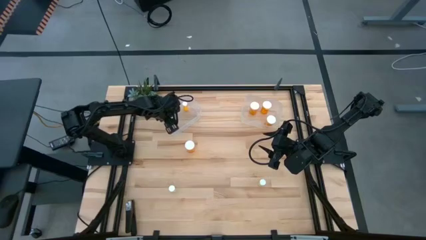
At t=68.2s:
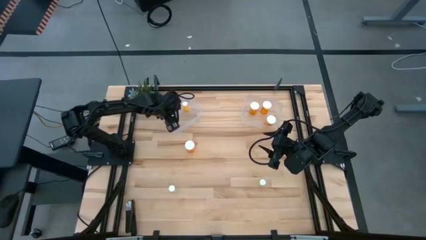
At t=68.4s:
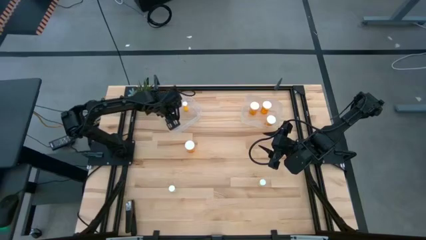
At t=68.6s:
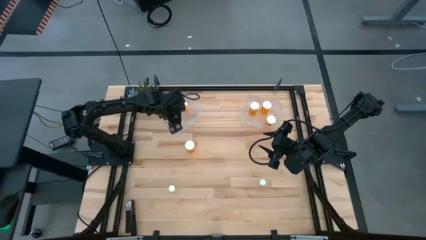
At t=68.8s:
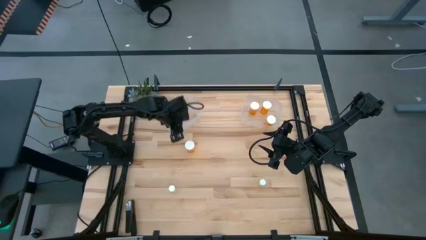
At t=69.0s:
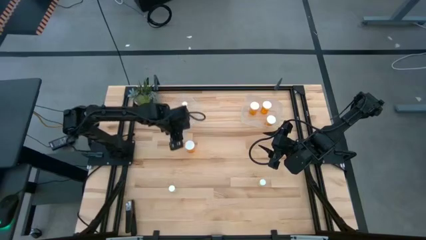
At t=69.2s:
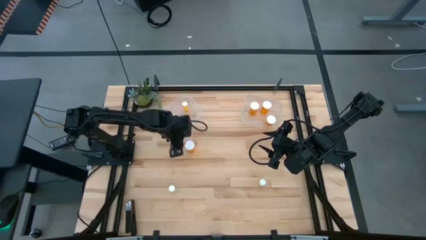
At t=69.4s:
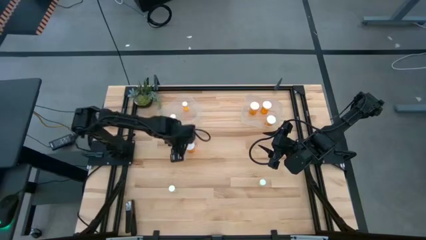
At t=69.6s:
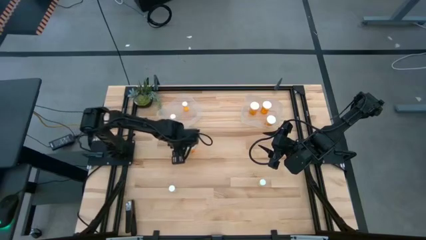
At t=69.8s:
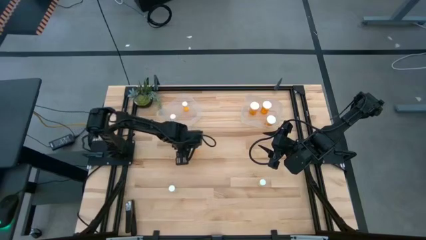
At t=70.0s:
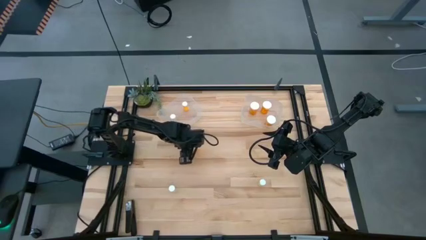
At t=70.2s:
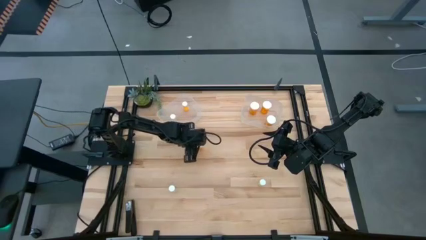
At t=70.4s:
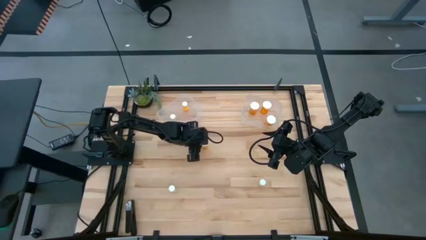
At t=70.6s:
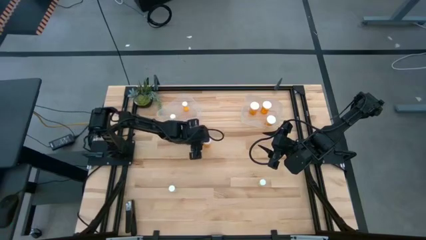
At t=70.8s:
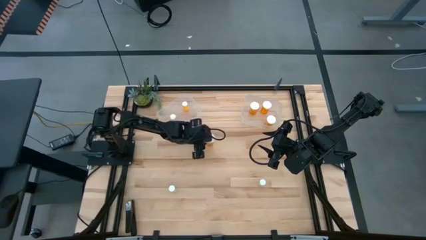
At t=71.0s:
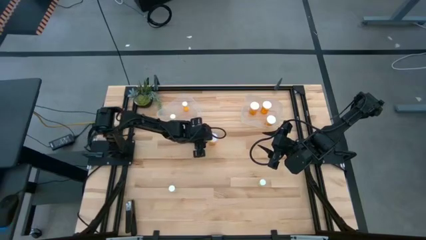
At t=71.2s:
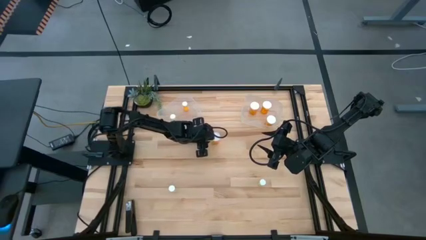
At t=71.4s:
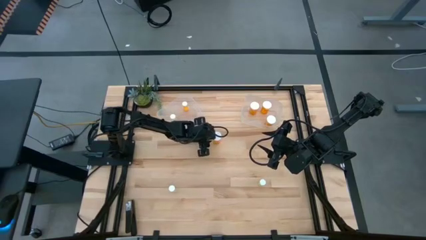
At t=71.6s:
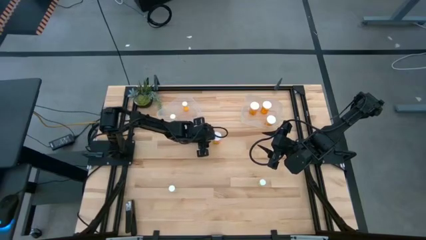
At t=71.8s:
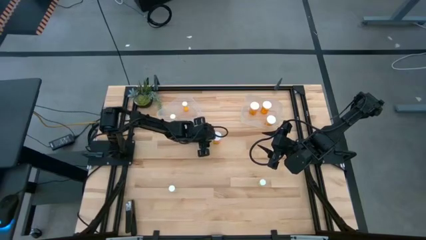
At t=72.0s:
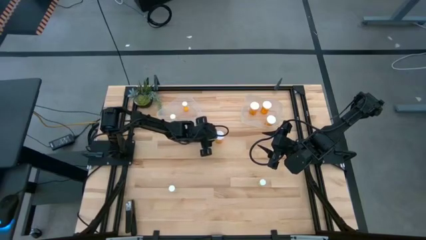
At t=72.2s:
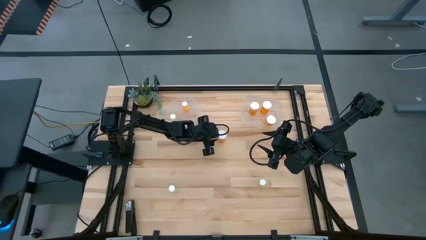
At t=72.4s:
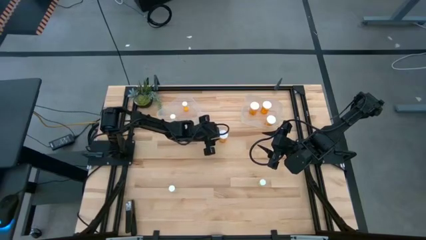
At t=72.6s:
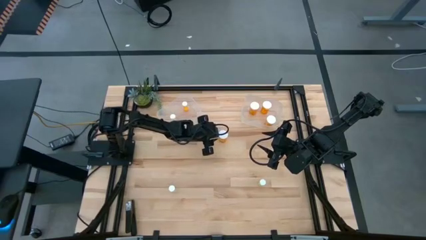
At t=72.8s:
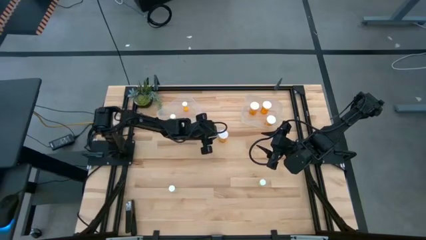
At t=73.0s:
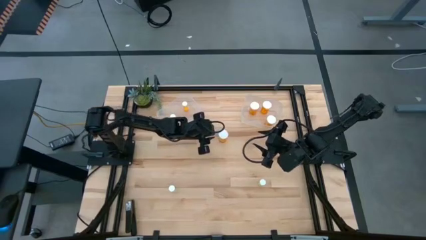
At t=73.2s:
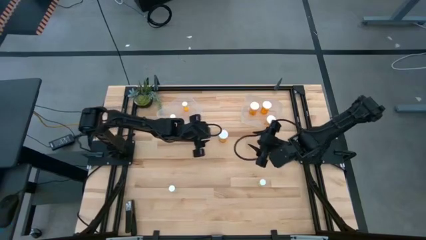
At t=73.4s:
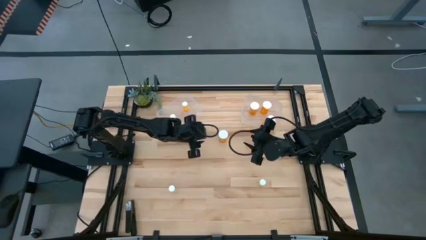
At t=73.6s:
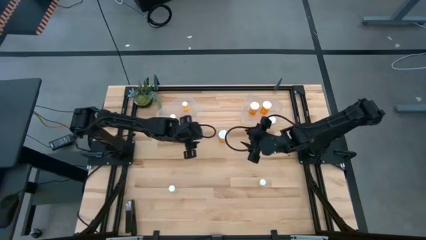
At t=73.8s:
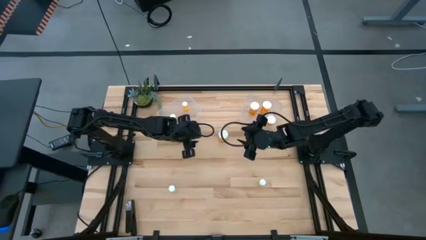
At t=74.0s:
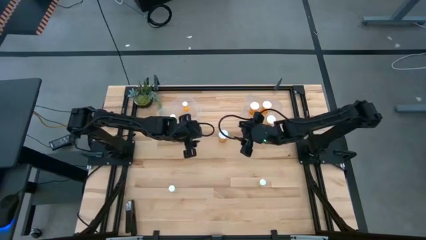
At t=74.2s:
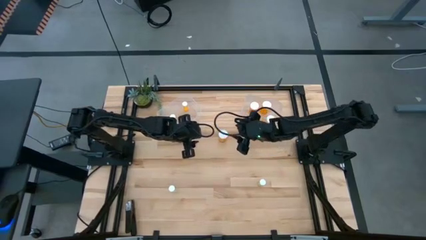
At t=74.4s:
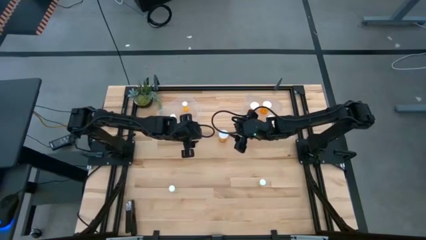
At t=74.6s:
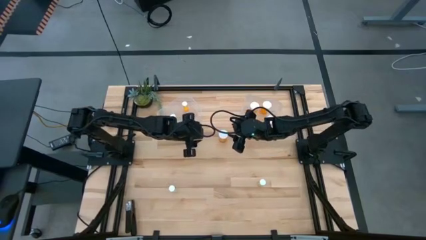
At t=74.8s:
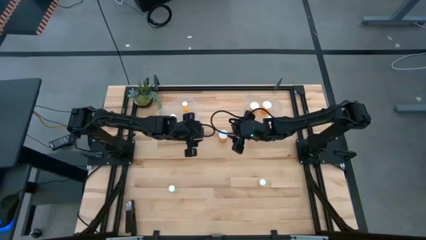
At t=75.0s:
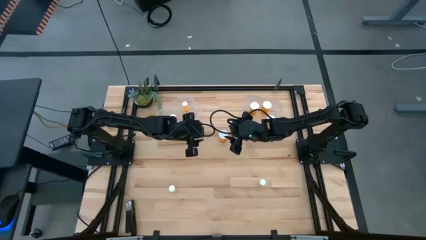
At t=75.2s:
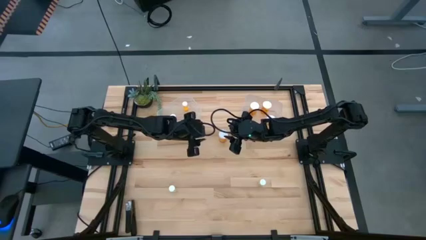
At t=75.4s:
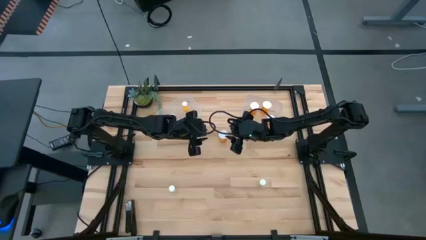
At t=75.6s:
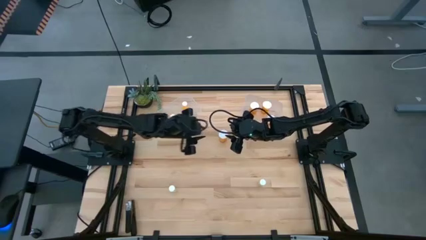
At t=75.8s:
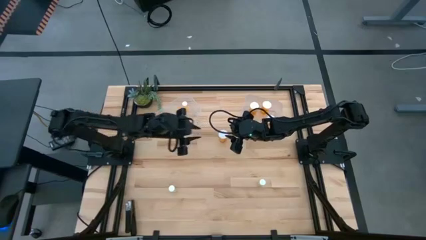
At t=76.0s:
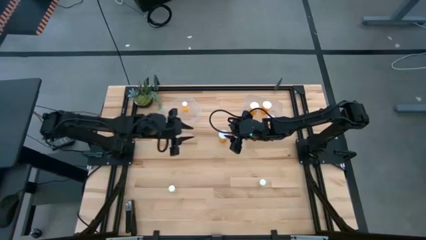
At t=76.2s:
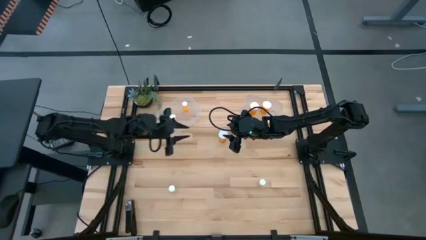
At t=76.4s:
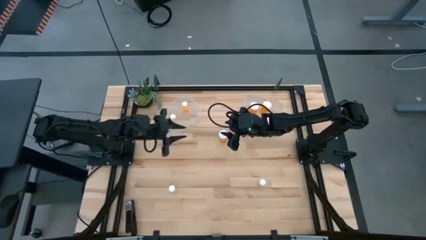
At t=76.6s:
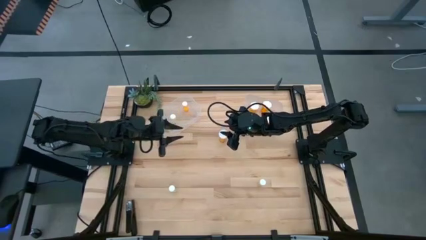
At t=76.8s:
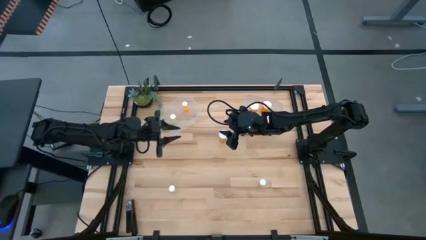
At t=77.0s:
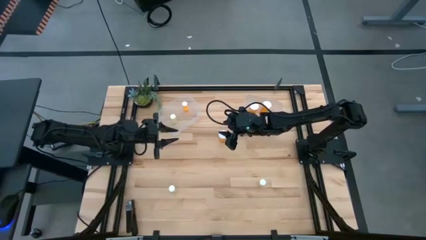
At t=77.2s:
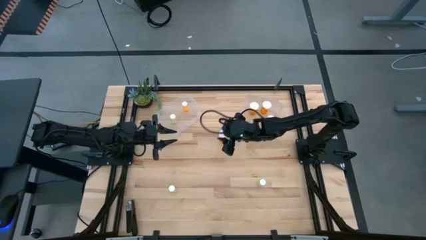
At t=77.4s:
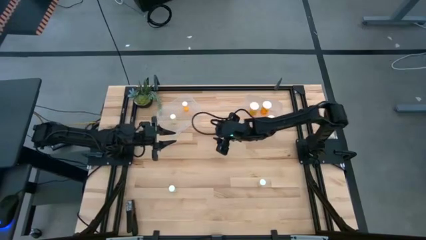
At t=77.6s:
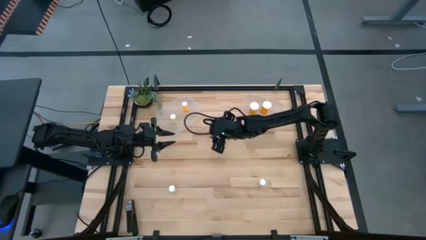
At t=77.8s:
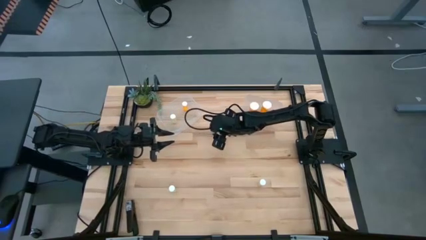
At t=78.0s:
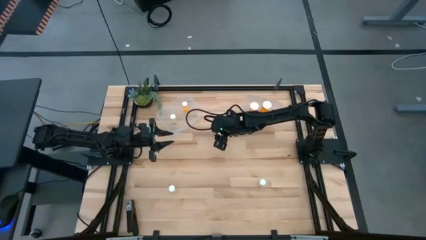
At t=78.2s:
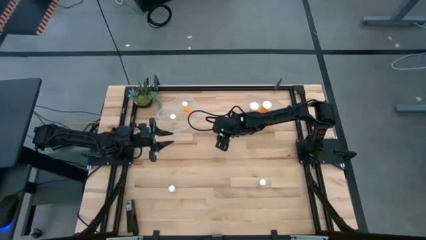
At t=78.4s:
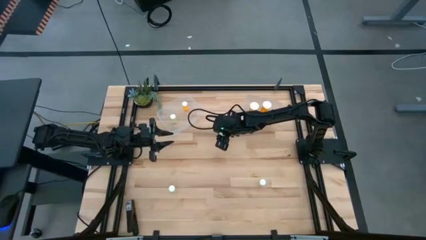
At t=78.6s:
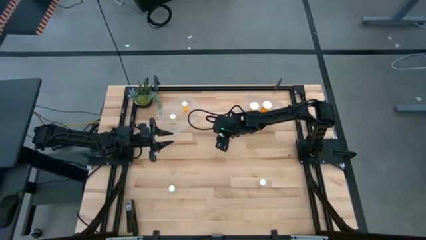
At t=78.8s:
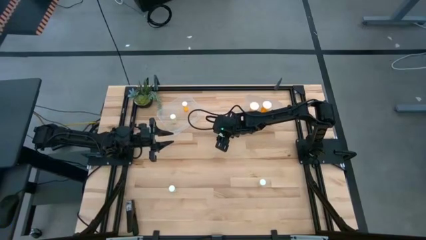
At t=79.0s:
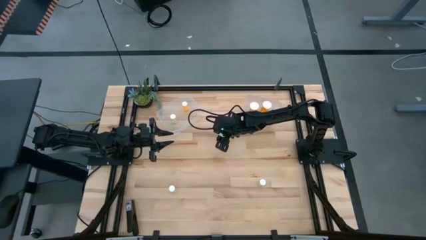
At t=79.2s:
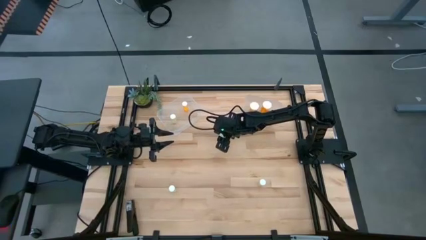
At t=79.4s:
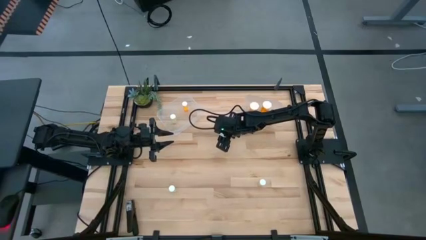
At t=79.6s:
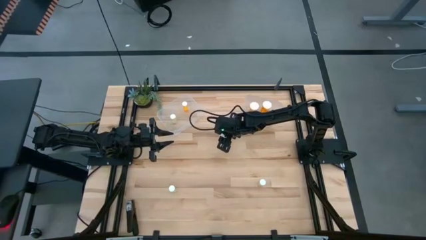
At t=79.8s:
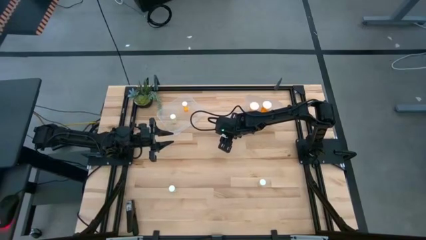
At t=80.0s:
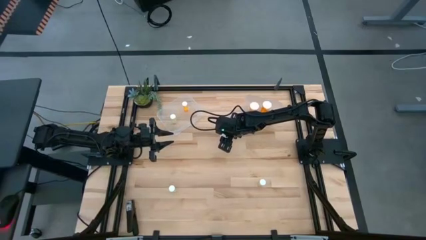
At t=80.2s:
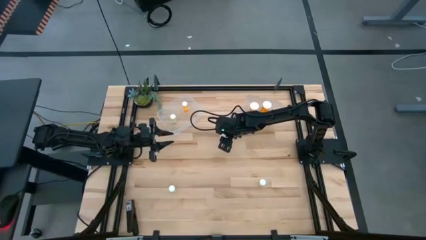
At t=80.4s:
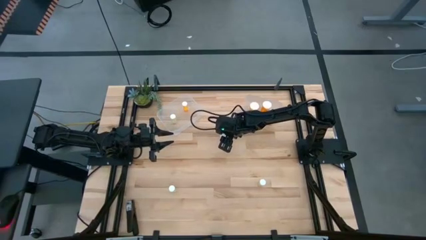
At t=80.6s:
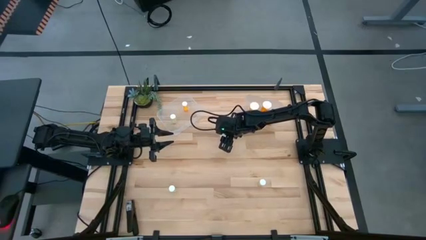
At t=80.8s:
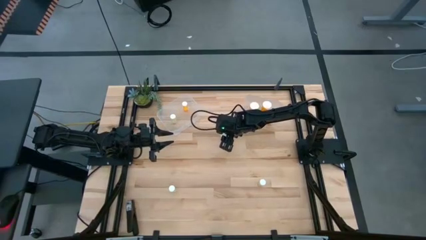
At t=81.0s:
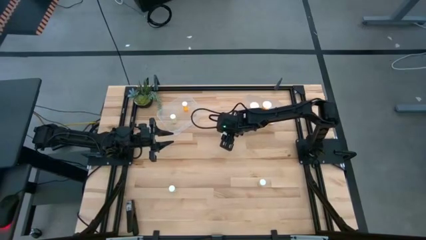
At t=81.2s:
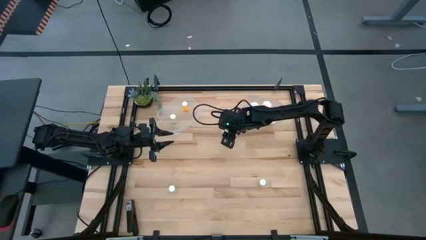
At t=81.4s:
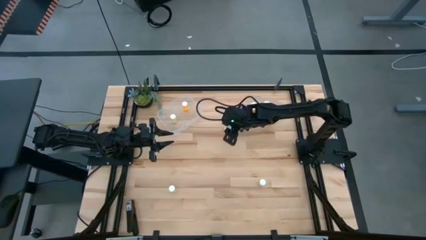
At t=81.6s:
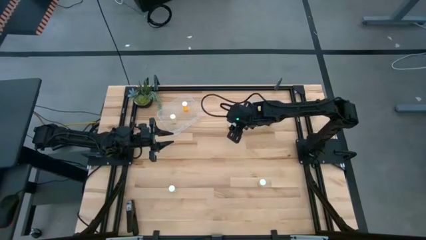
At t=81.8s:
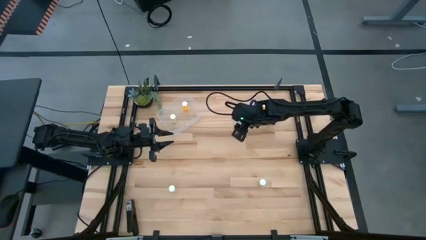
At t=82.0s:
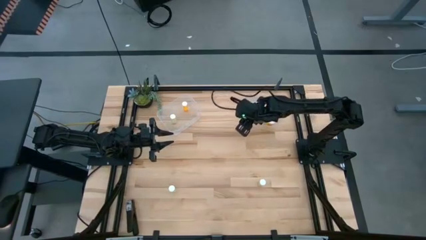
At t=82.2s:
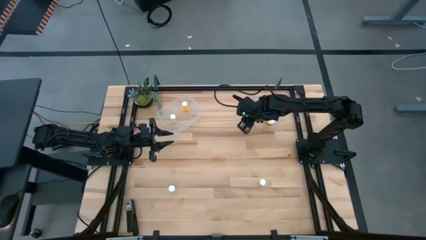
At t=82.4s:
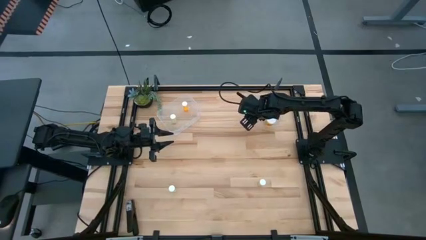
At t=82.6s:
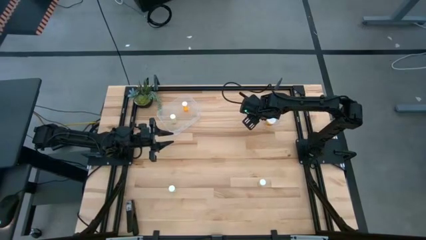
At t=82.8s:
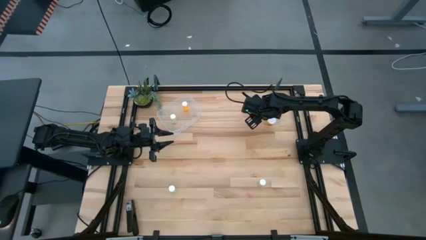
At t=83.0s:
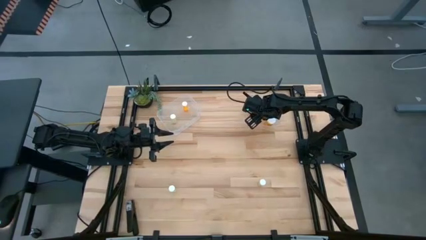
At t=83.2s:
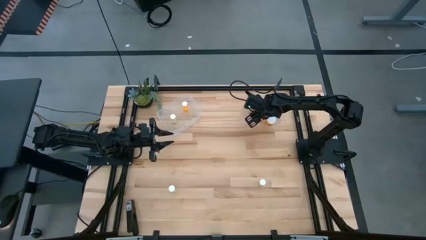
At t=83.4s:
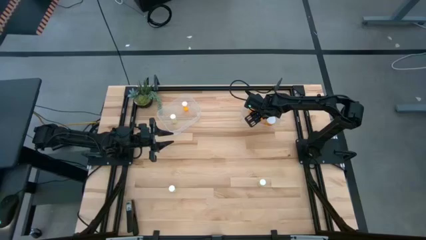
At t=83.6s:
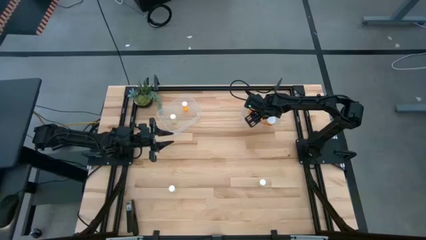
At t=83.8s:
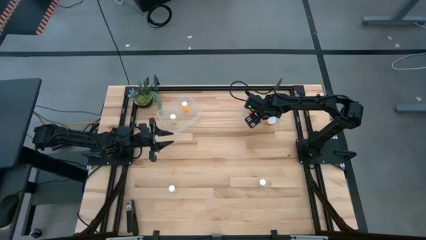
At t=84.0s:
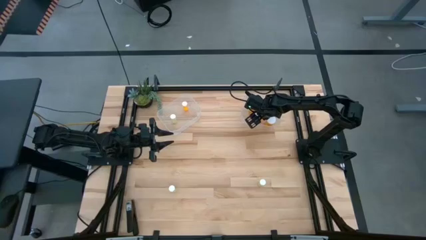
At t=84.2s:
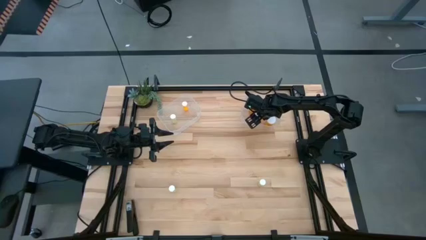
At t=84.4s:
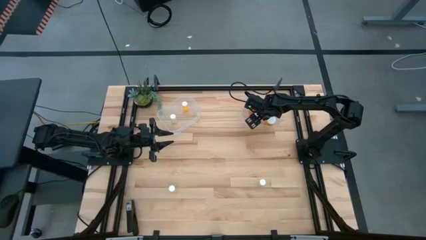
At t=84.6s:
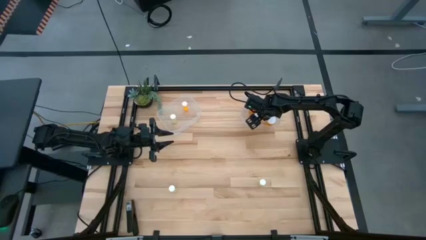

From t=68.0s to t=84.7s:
Task: Pick and place medicine bottles into bin by pill shape (circle, oval)
Put the big orange pill bottle into the right transparent bin
